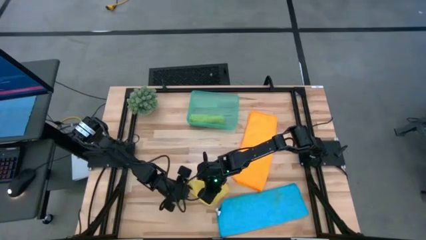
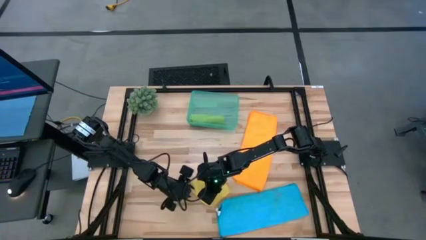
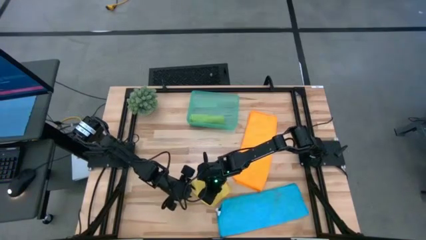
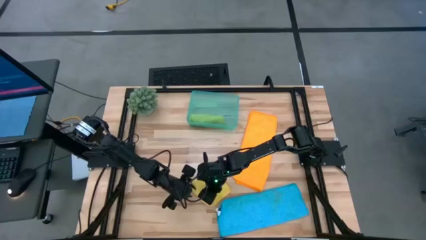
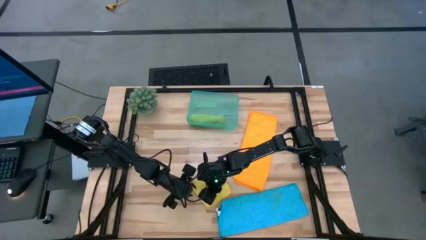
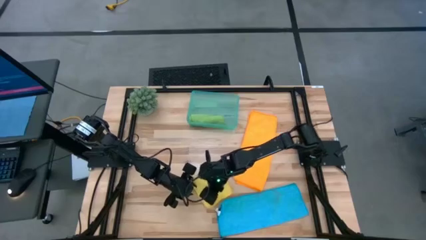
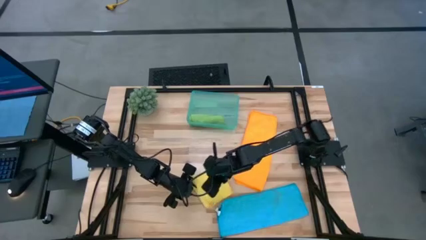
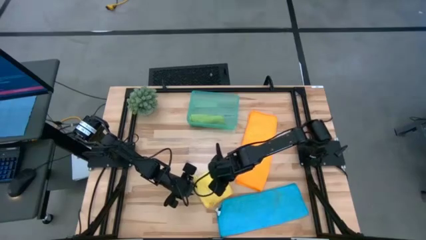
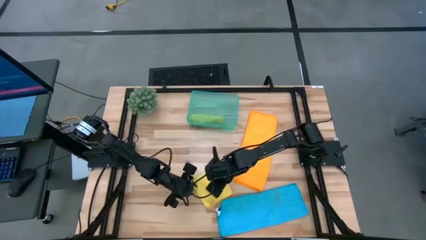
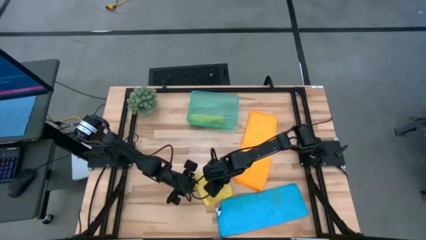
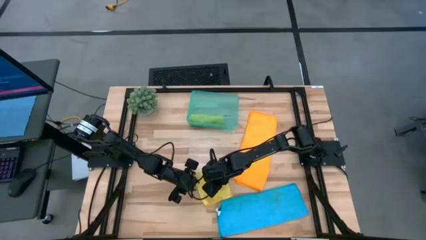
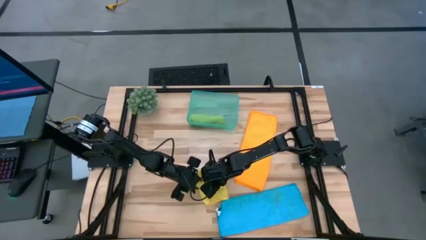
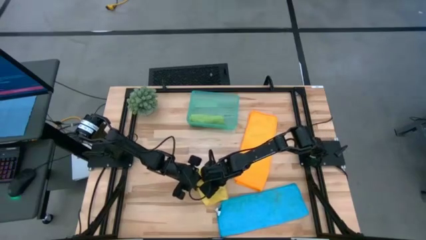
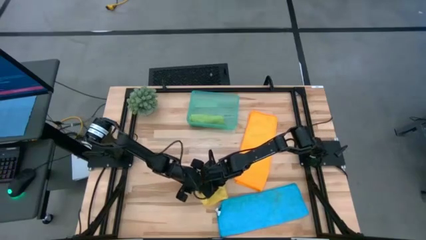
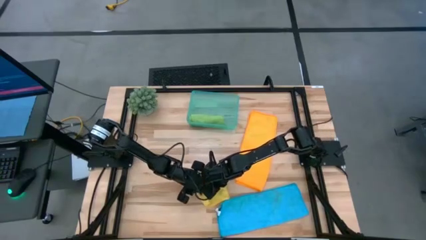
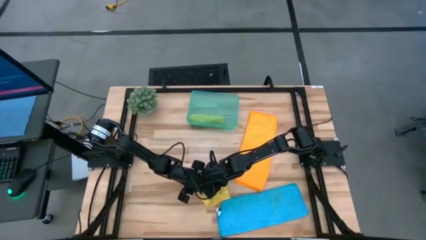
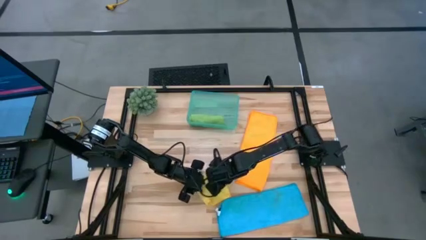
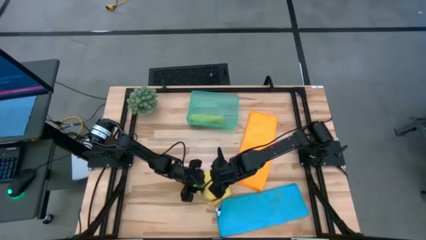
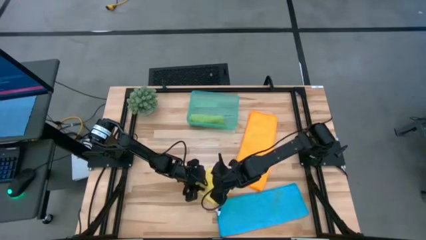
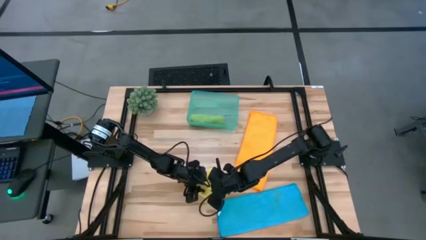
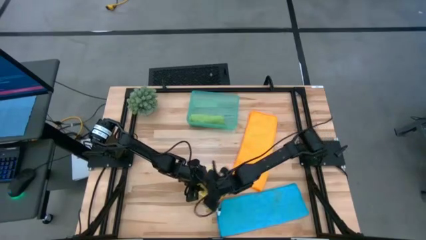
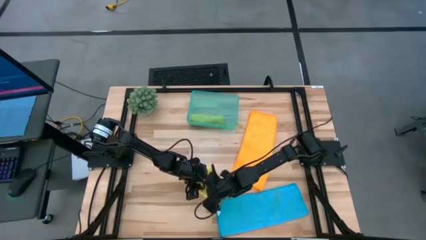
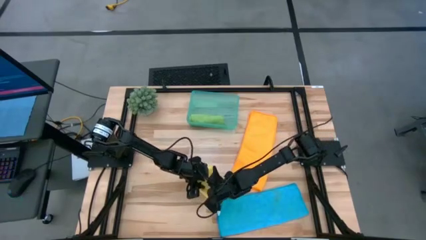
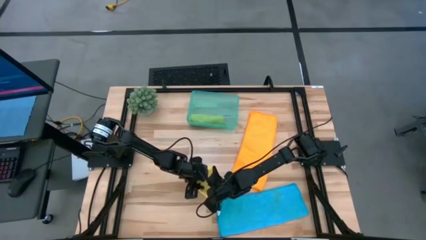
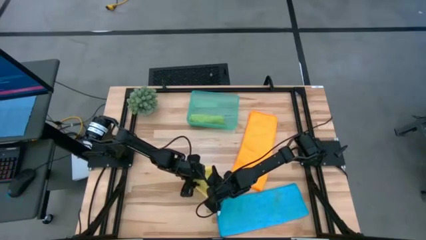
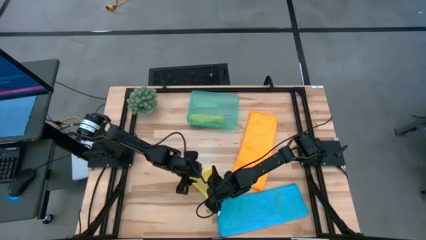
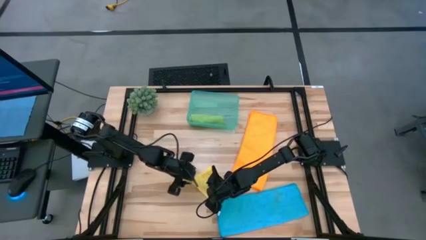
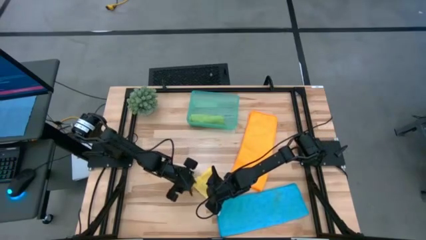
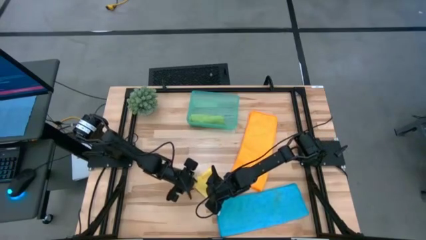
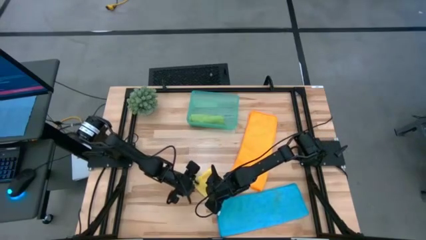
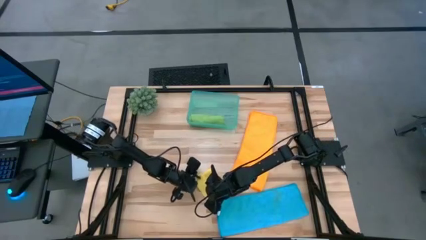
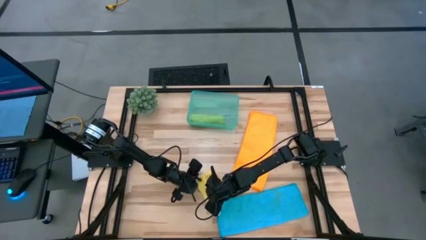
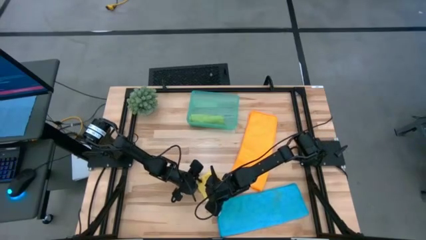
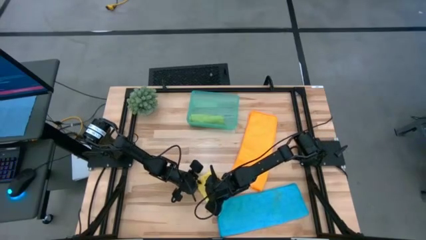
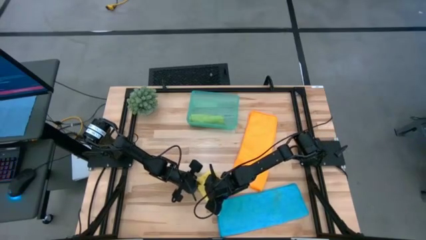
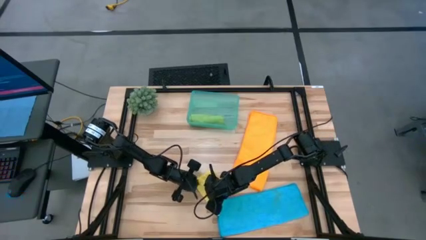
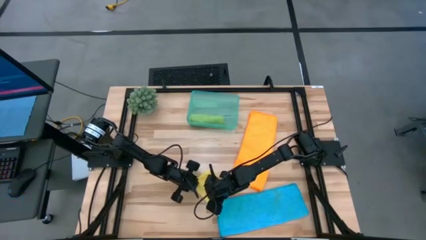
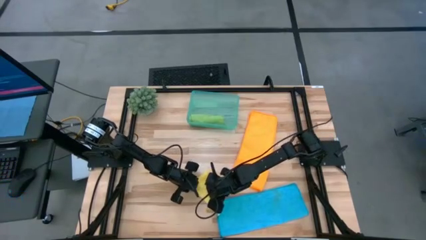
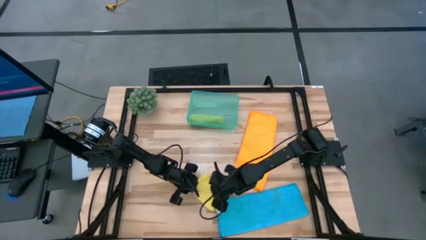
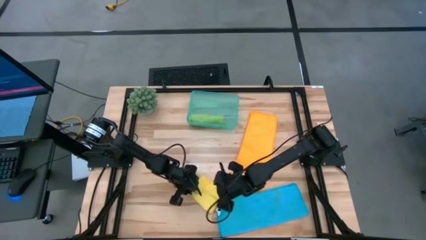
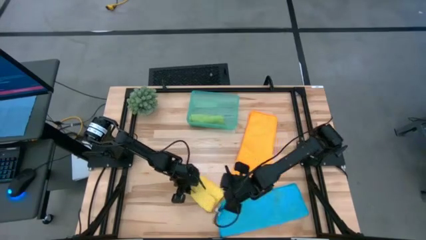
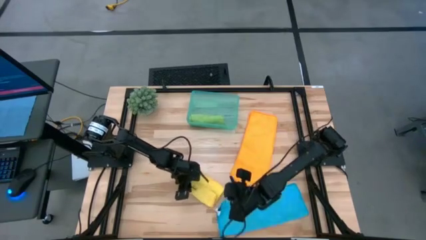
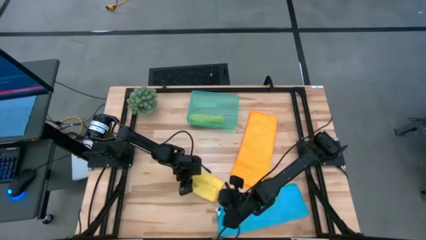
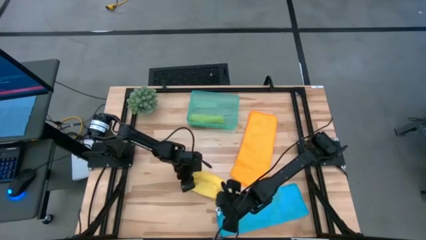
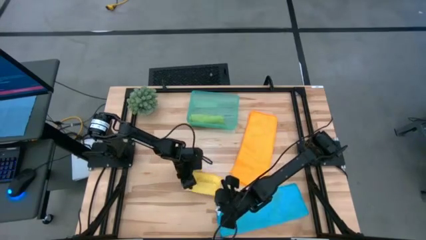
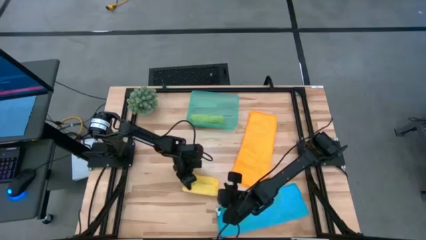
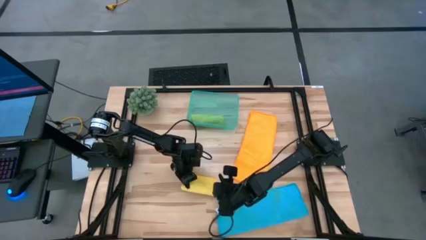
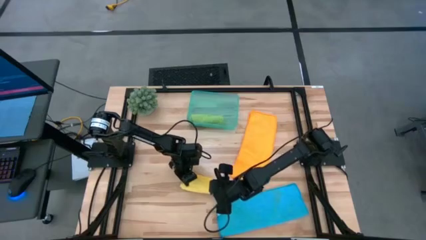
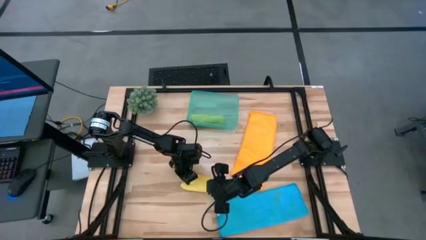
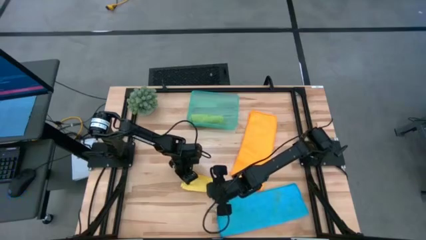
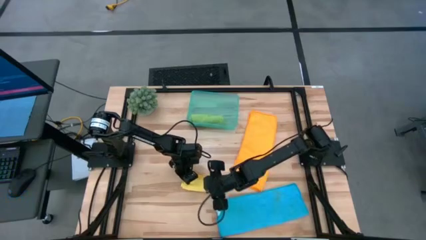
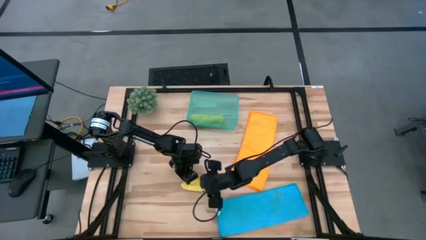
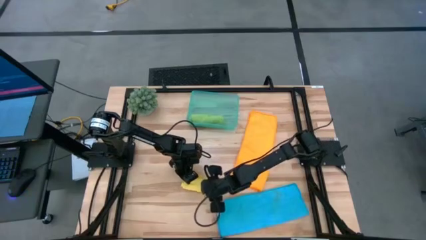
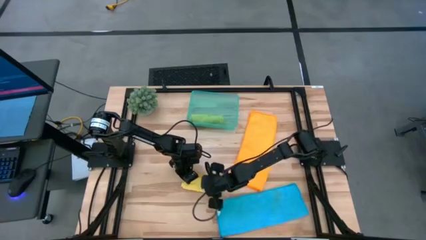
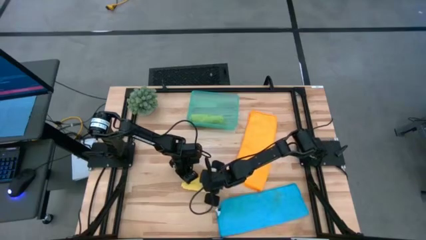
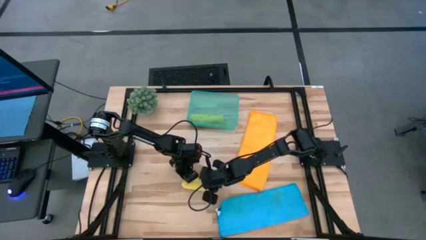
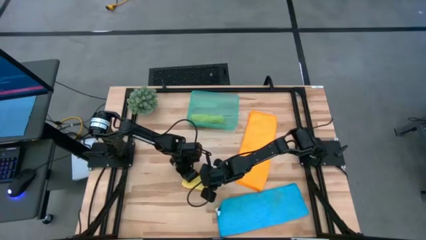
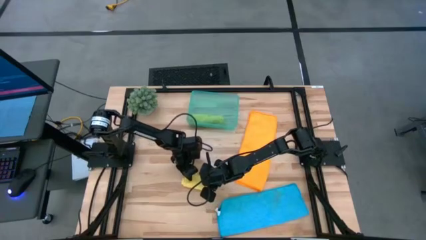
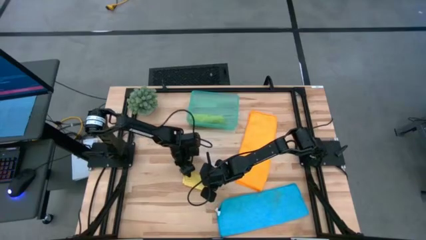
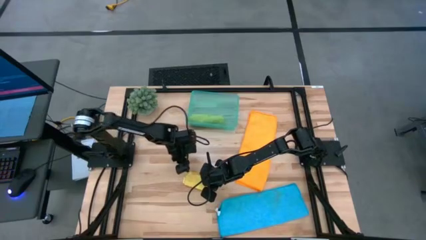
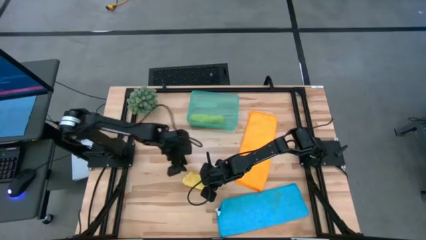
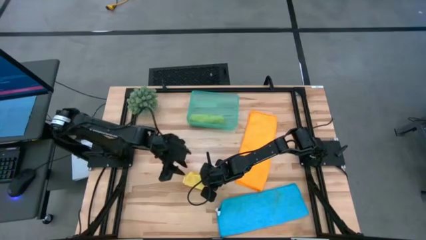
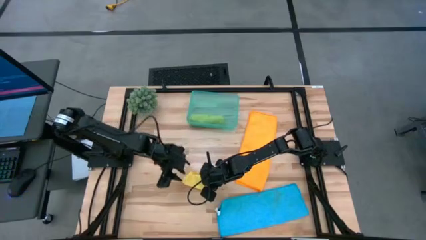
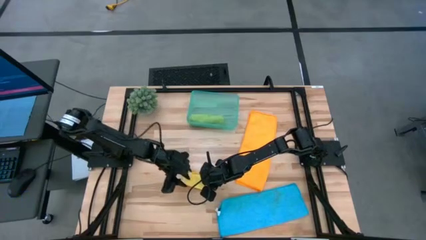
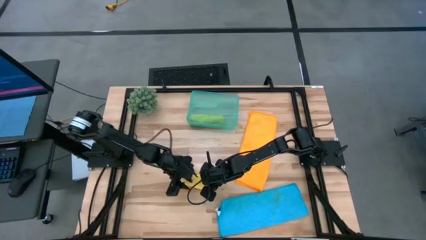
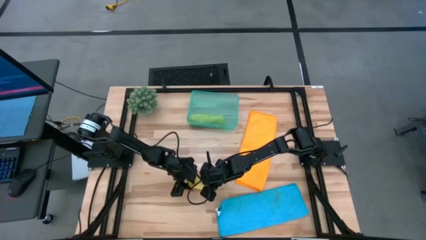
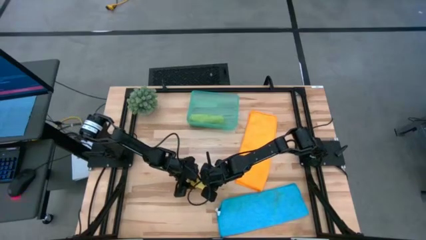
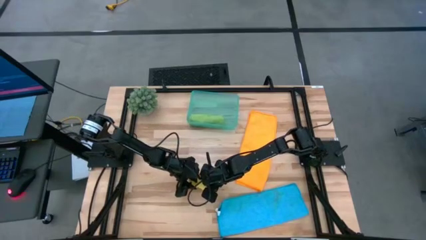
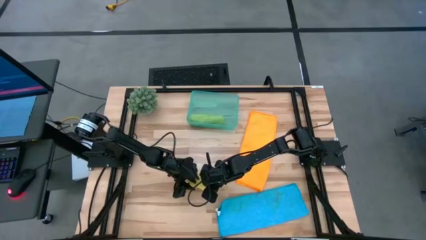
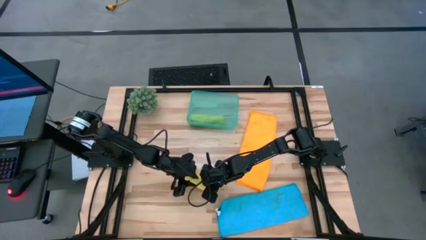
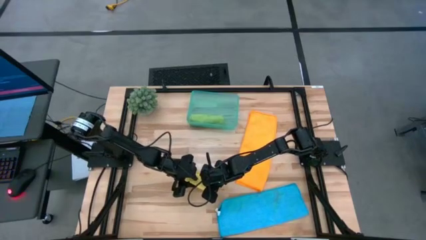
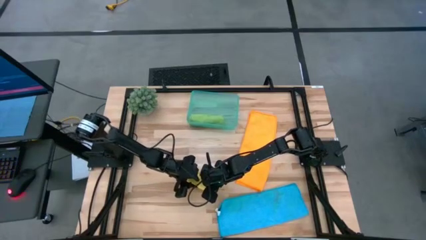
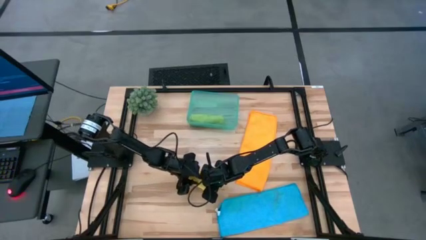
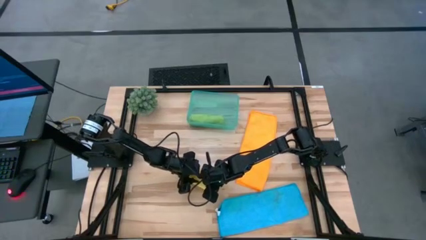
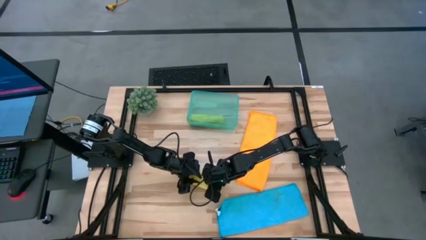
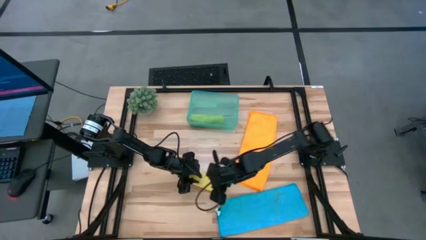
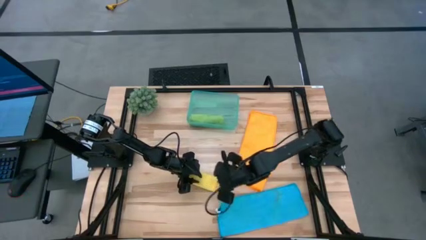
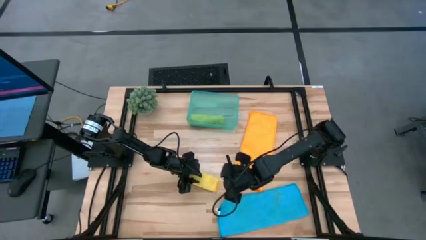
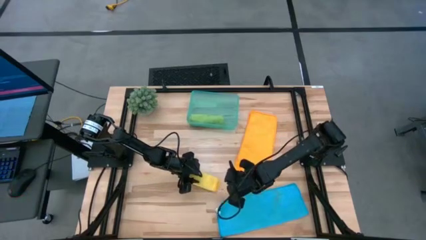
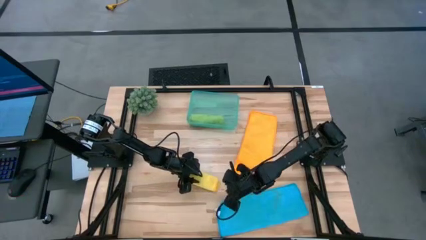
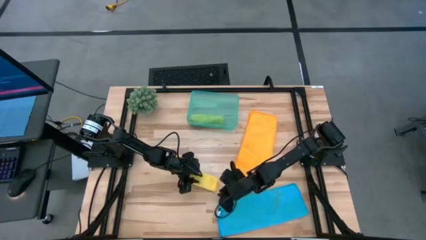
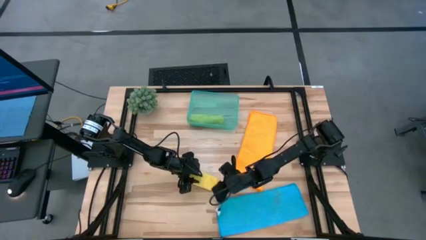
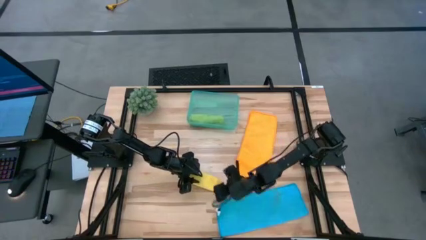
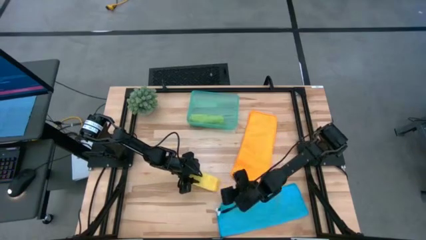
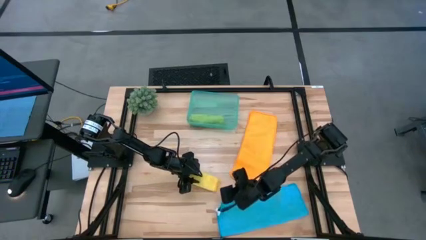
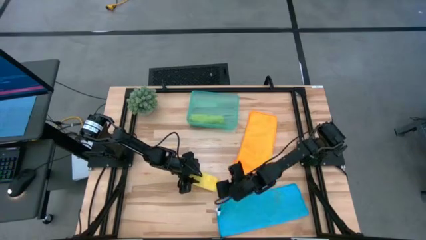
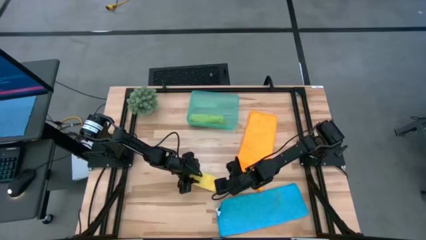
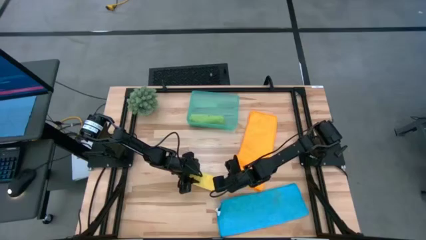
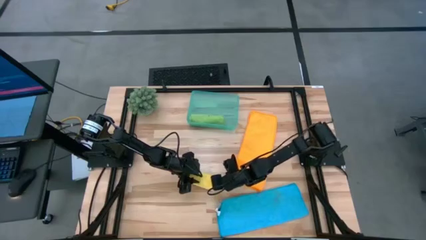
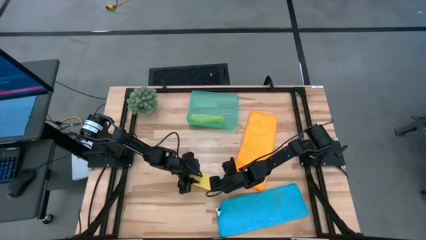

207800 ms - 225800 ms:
Task: Roll microfiber towels into tight, uniform cylinder then place into a basket
Roll the yellow towel
